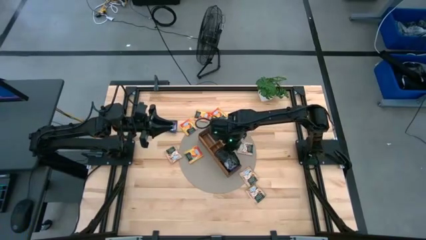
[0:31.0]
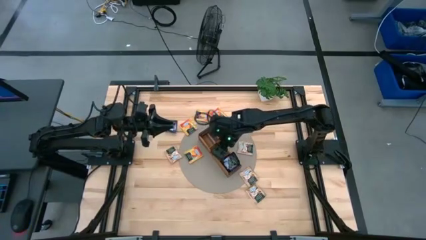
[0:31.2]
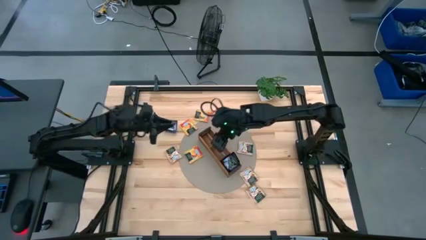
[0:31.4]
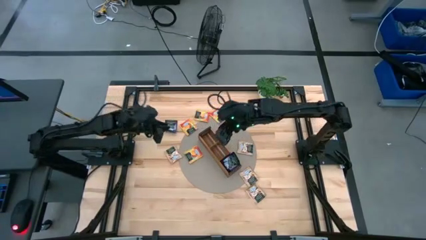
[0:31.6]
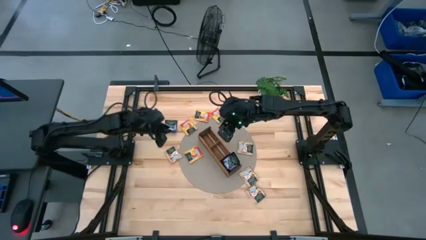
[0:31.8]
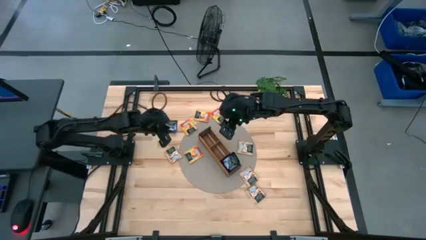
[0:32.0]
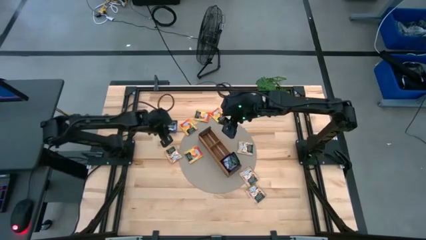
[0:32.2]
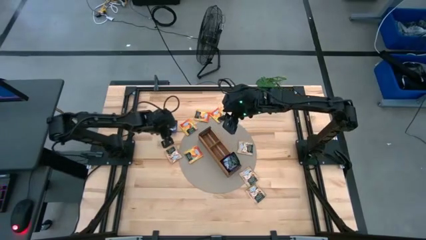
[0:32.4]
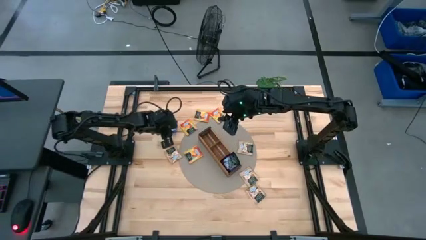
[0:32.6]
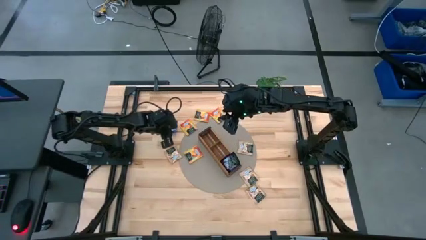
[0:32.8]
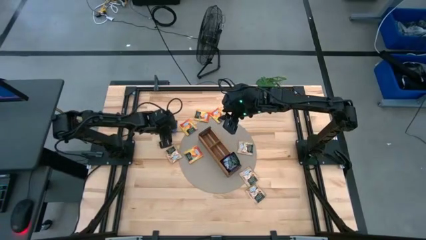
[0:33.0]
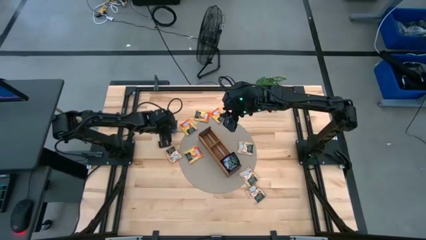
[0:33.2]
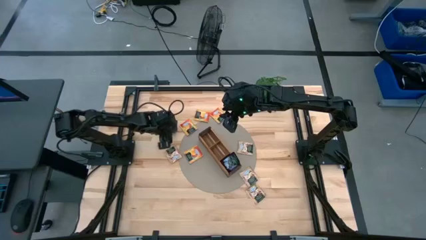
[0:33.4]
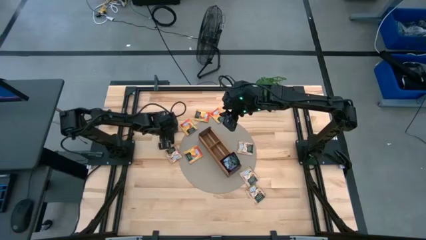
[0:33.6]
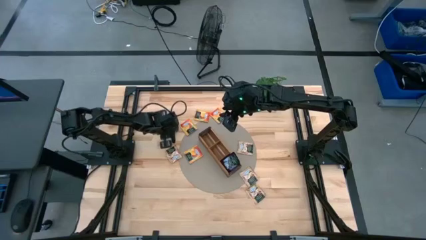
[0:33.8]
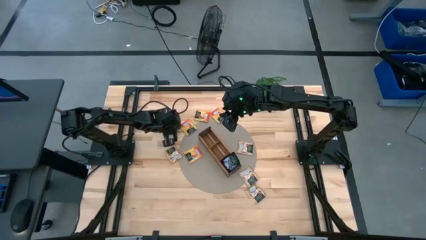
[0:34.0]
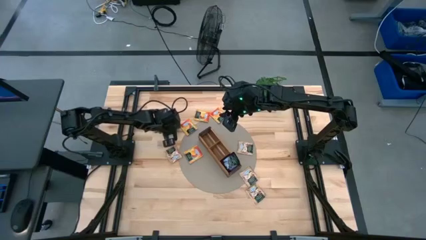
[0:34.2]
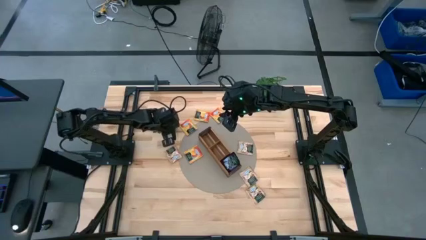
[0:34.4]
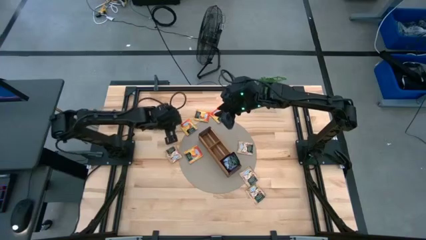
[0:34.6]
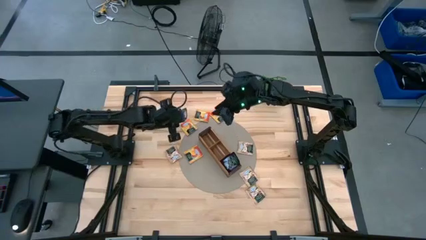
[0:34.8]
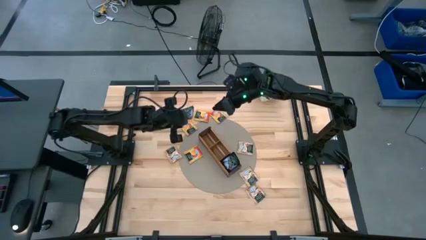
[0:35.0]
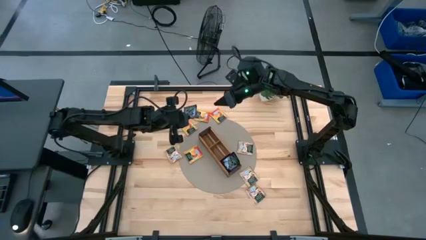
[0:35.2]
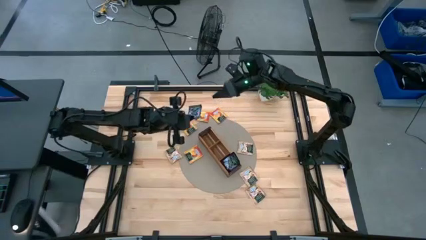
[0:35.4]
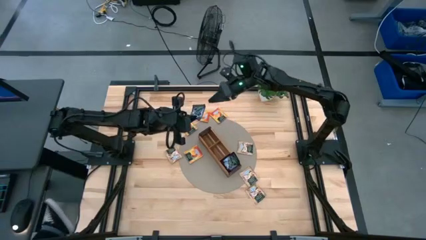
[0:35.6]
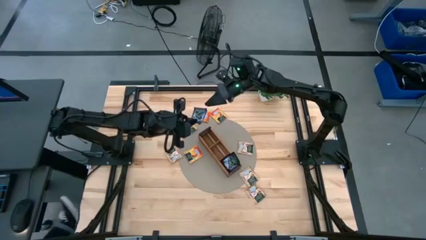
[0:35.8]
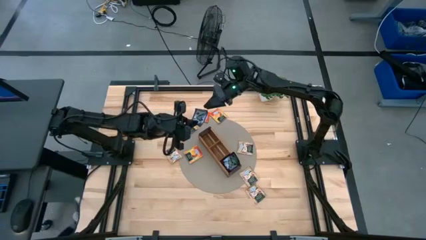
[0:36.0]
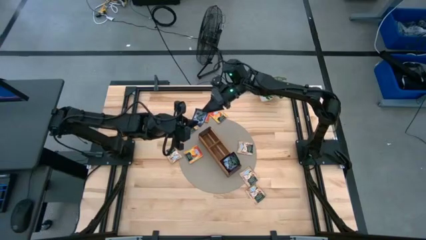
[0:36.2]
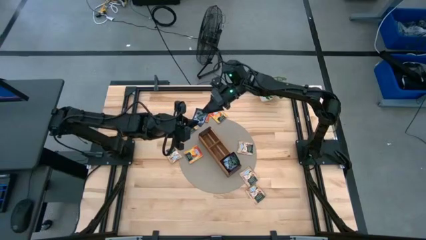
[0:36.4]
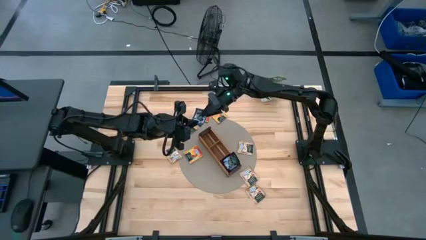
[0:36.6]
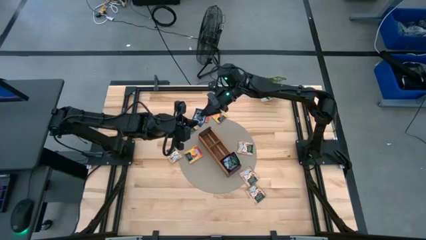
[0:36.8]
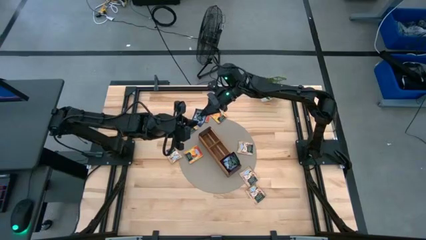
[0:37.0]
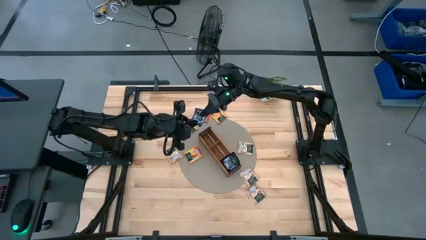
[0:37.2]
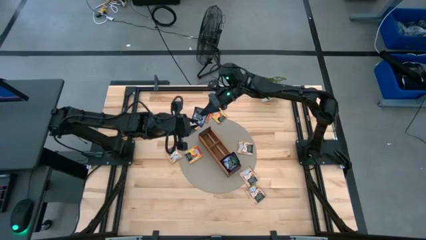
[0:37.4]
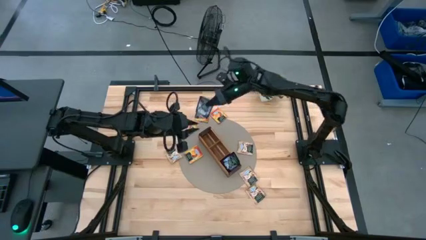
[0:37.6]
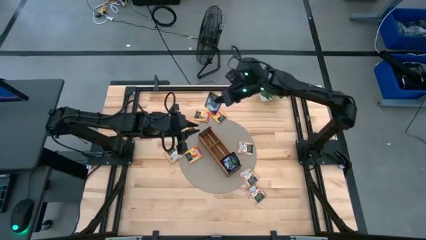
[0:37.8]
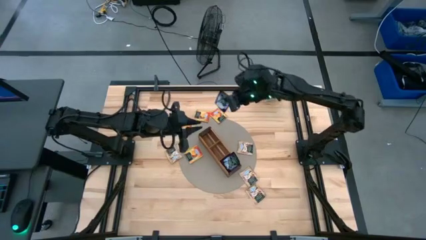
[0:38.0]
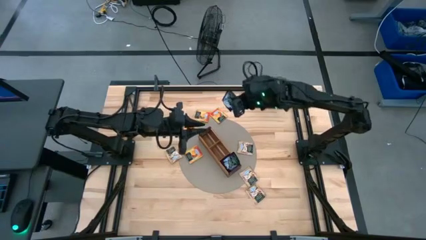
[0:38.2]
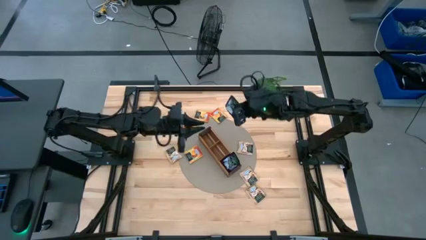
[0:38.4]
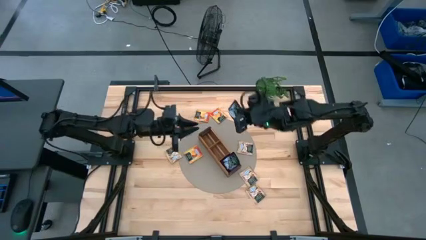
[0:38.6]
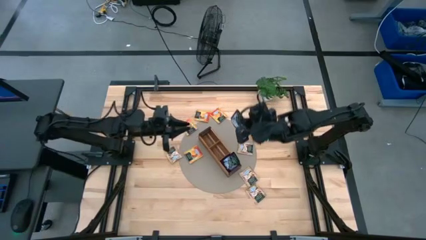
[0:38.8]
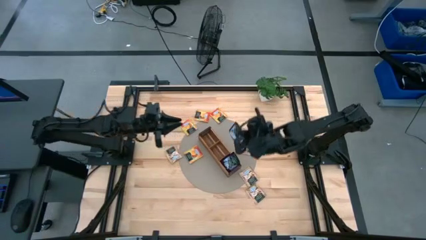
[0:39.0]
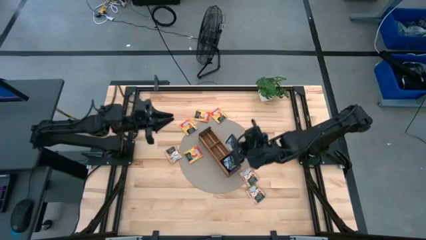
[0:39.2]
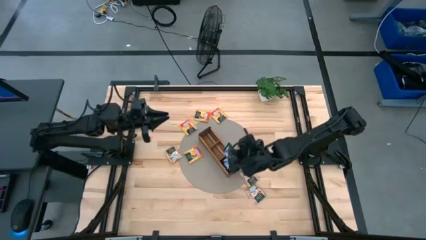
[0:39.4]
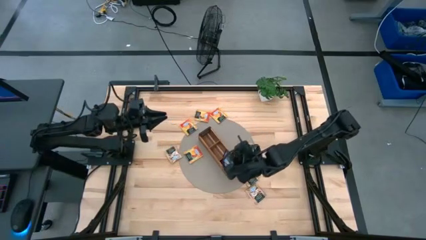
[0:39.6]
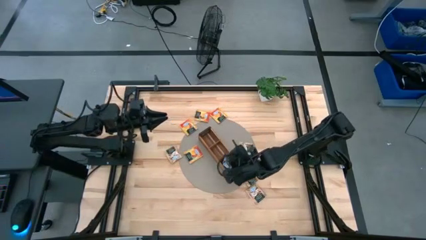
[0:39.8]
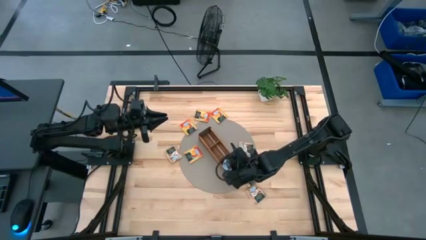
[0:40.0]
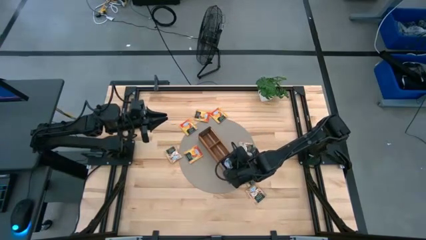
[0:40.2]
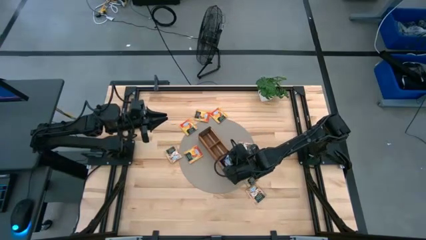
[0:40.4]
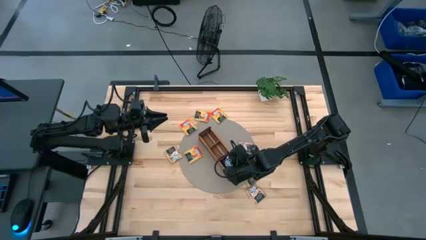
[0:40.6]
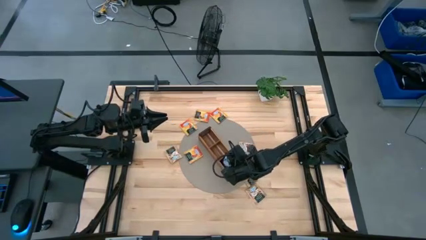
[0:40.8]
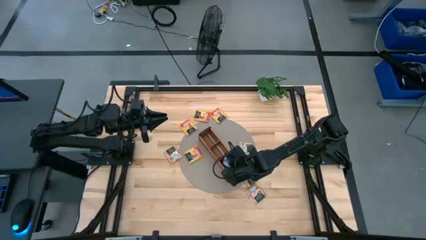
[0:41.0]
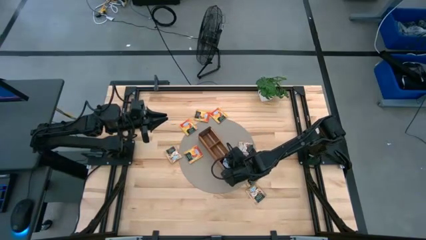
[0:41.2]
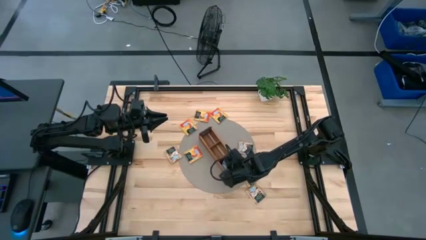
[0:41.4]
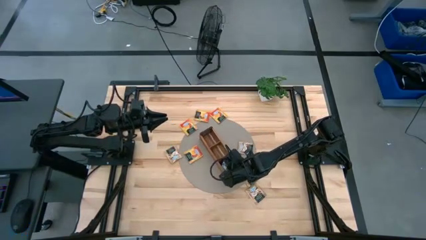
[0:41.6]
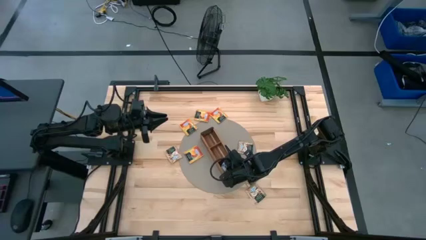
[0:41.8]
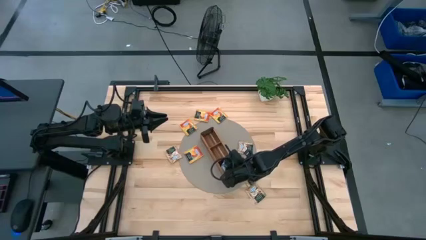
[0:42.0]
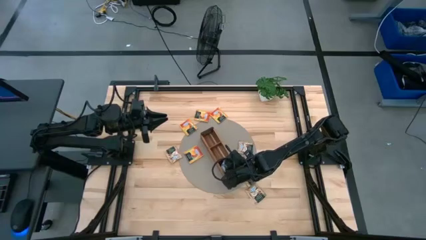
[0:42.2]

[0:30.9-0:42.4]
Task: Pick & Place Tea
Put the purple tea bag into the right section of the wooden organizer

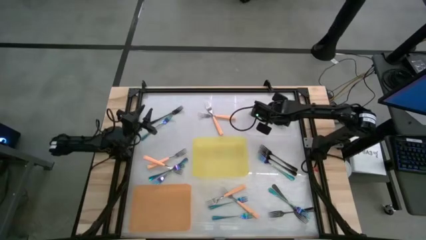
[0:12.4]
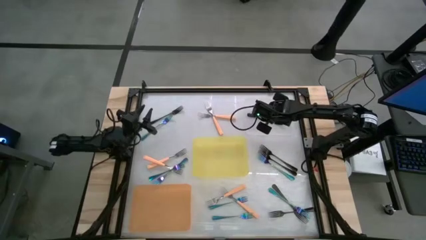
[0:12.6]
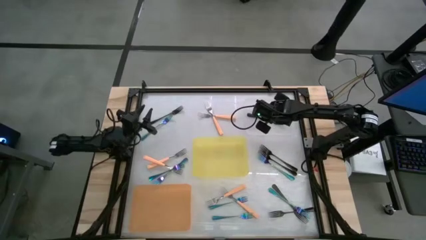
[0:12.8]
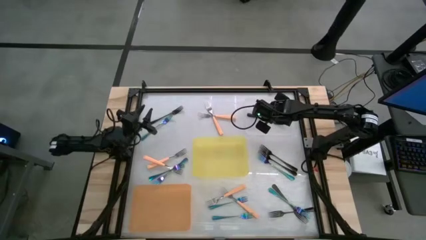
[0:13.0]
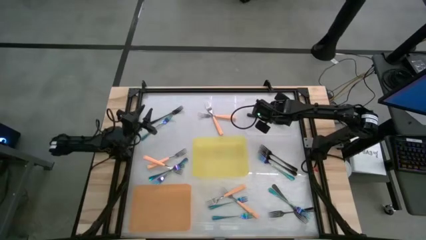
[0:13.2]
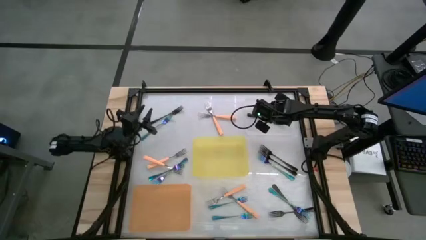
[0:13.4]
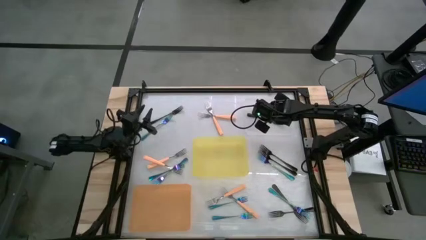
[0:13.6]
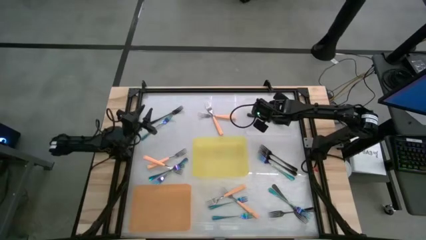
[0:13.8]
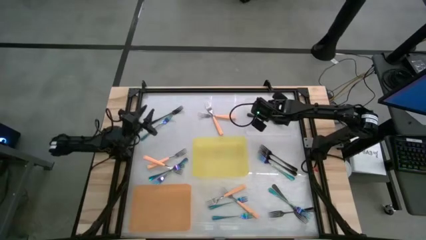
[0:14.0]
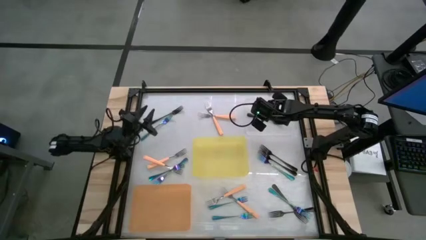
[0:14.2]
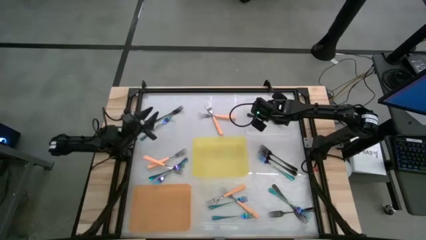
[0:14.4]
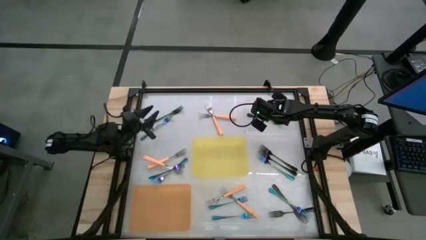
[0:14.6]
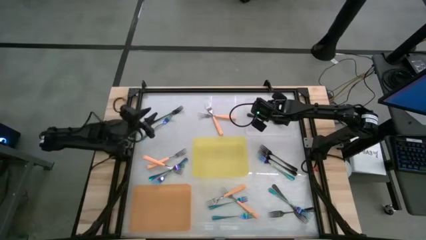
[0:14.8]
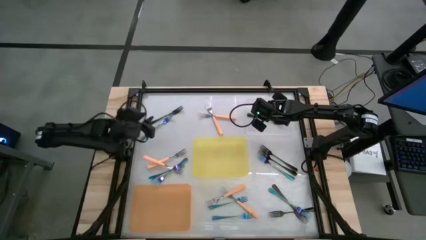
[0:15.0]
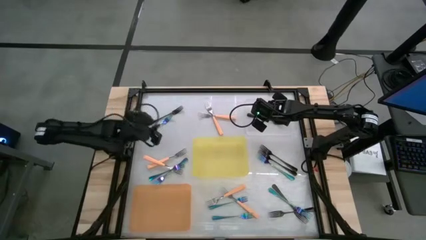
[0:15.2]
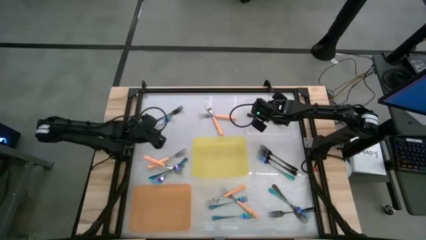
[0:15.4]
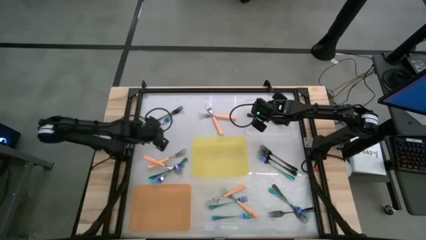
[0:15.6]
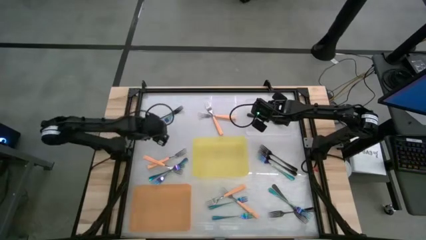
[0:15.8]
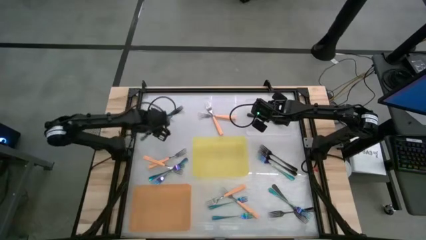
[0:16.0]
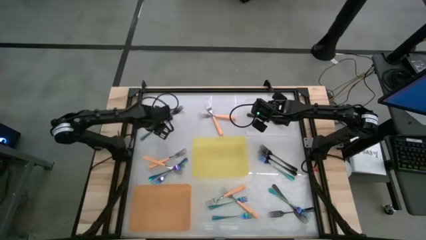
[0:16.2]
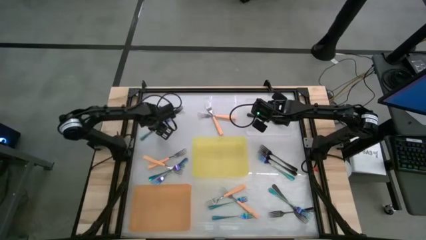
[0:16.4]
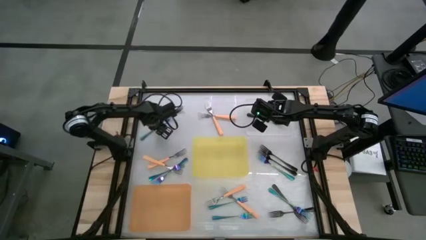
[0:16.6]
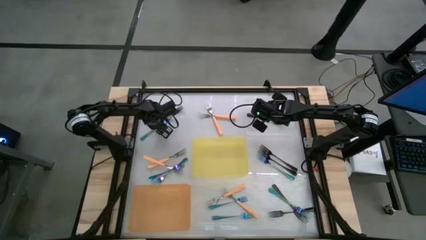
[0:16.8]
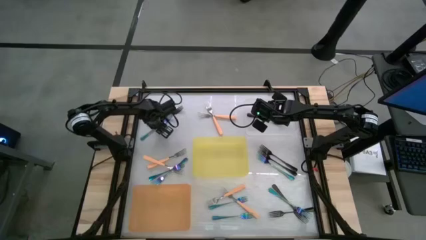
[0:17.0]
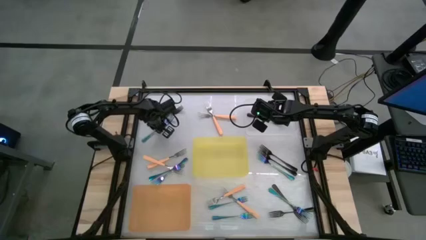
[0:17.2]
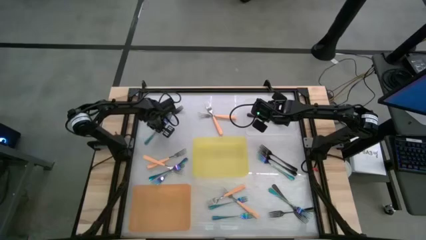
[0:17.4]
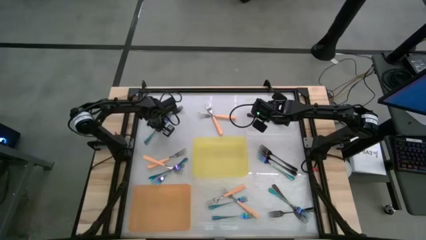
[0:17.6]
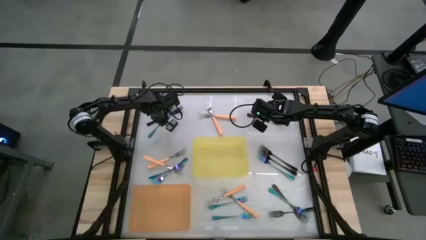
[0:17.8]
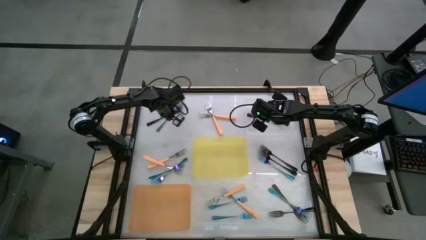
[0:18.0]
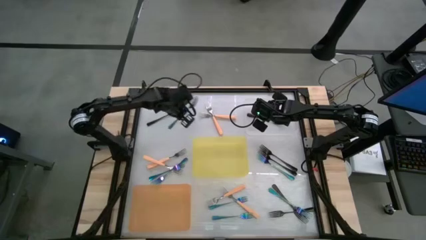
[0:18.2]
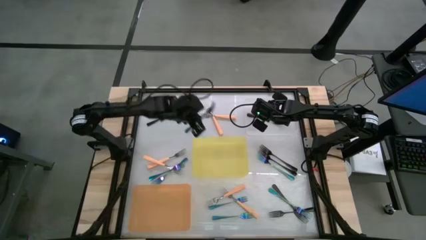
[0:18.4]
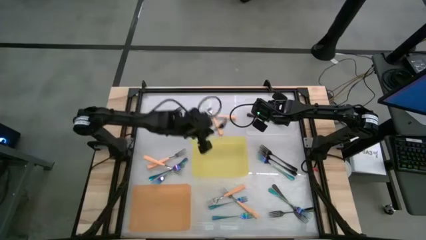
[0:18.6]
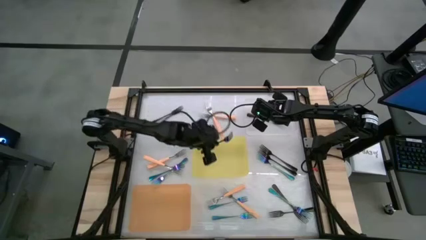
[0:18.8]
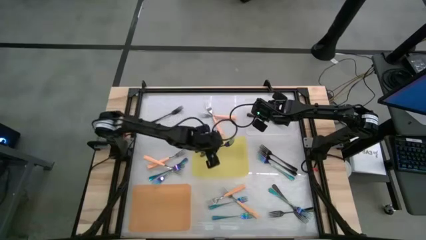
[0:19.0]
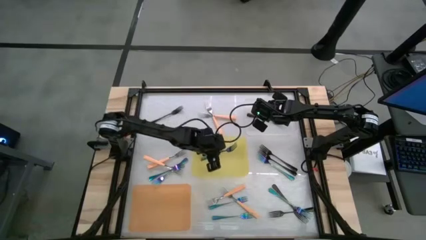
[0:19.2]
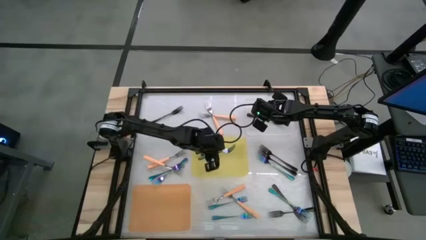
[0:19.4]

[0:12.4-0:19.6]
Task: Sort silverware by color (type)
Put the blue fork into the yellow bin
